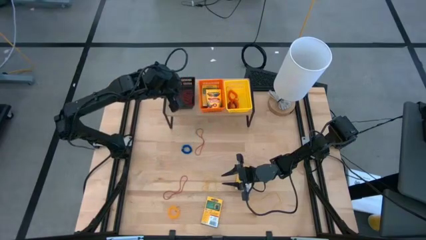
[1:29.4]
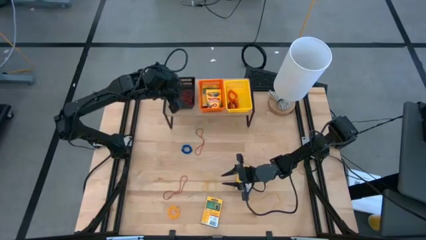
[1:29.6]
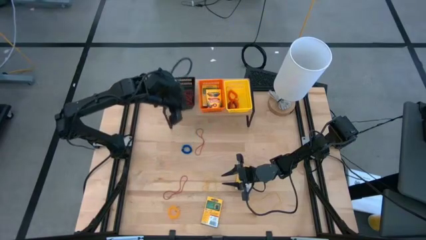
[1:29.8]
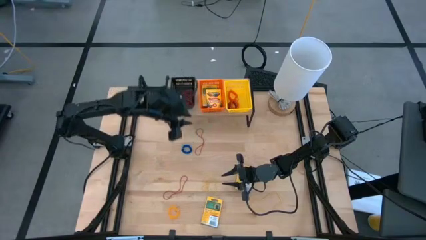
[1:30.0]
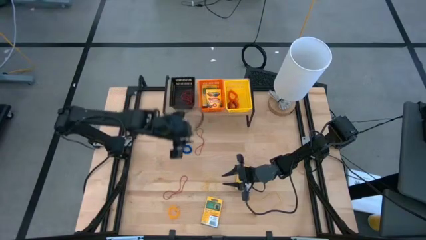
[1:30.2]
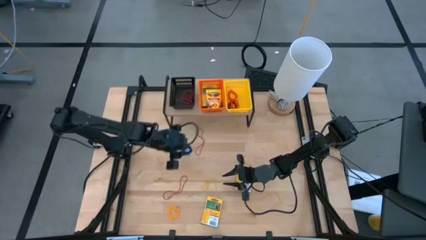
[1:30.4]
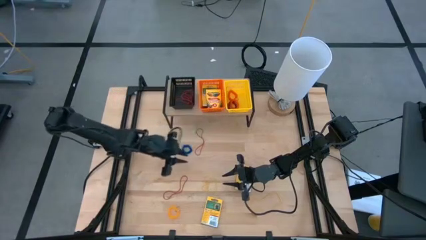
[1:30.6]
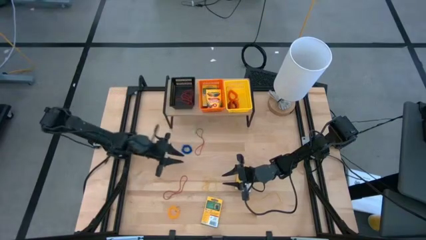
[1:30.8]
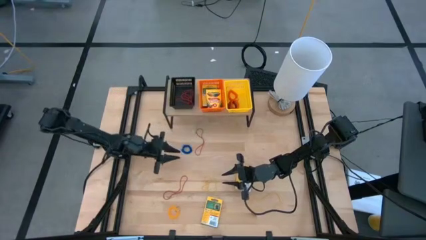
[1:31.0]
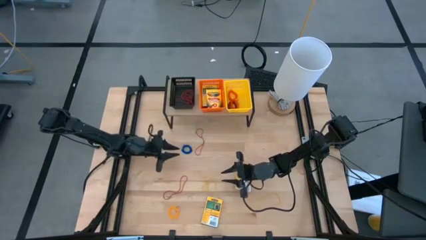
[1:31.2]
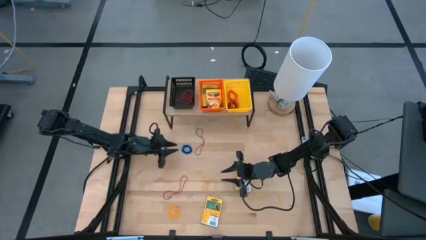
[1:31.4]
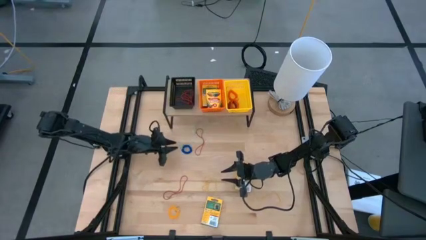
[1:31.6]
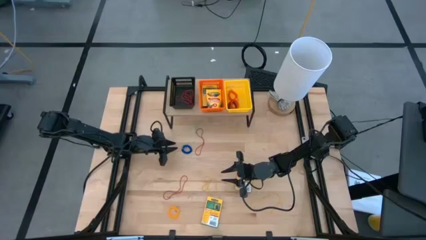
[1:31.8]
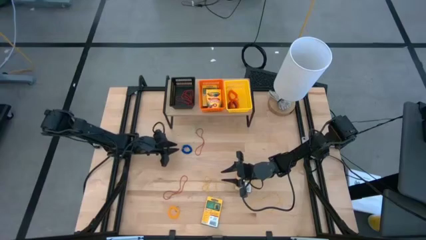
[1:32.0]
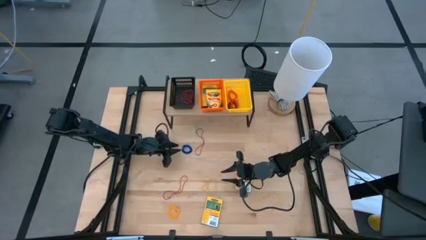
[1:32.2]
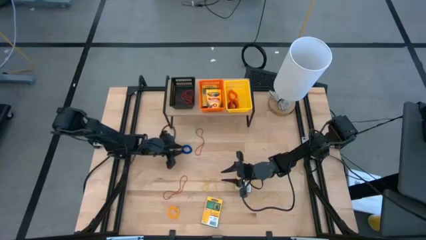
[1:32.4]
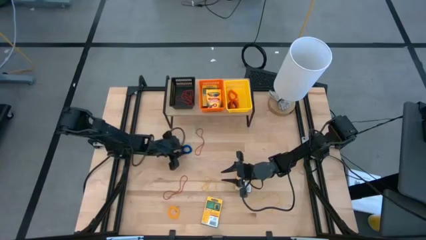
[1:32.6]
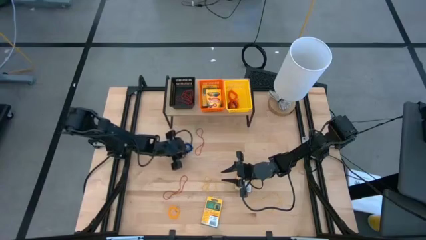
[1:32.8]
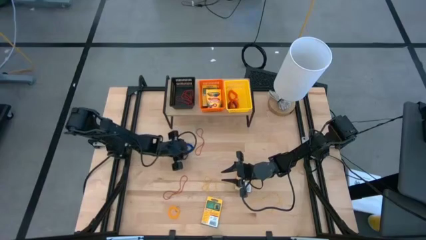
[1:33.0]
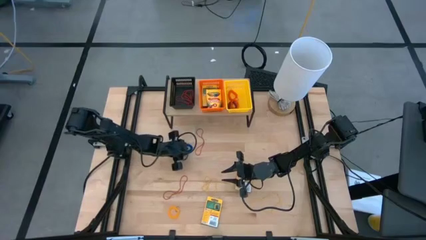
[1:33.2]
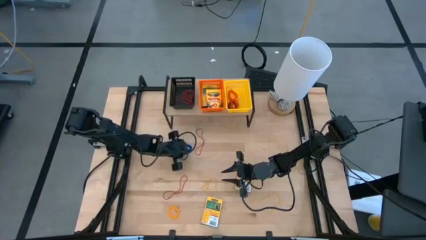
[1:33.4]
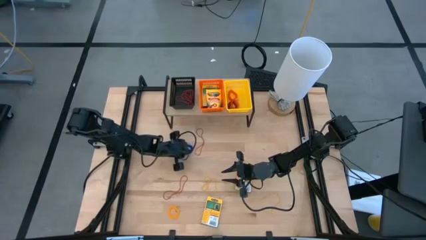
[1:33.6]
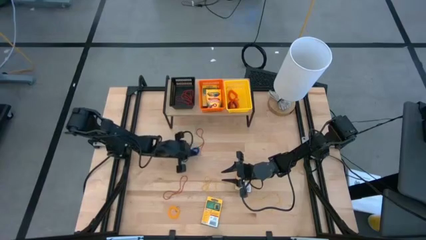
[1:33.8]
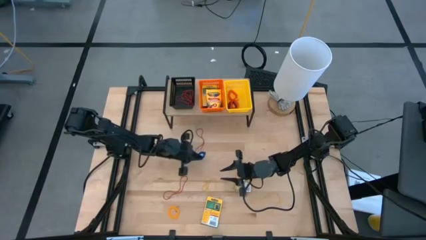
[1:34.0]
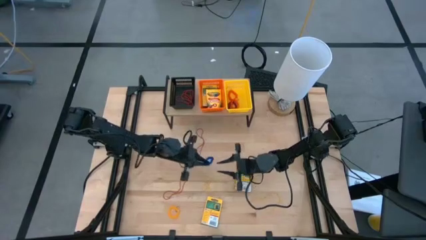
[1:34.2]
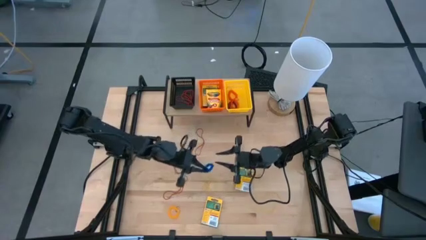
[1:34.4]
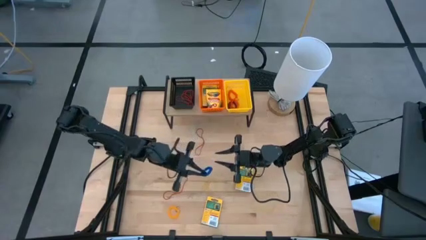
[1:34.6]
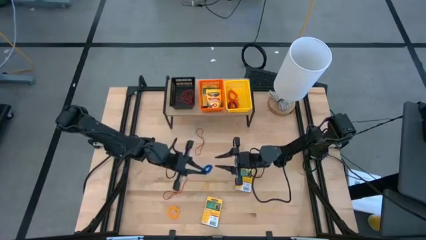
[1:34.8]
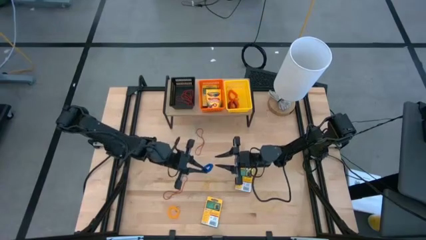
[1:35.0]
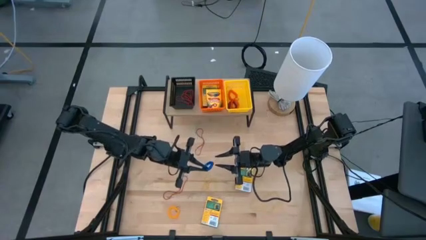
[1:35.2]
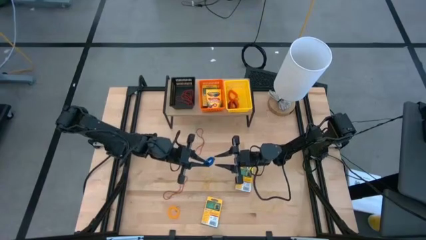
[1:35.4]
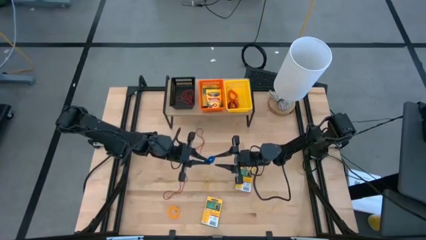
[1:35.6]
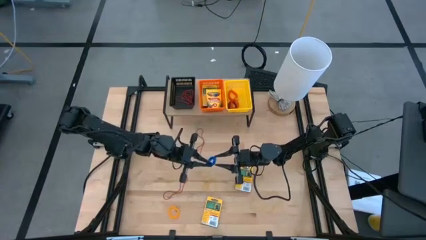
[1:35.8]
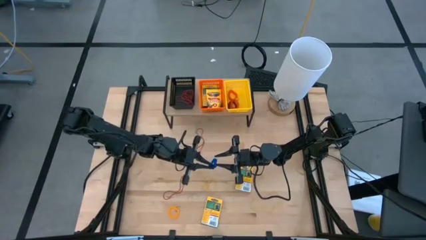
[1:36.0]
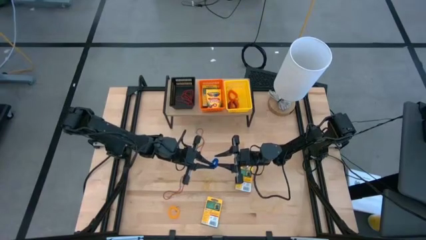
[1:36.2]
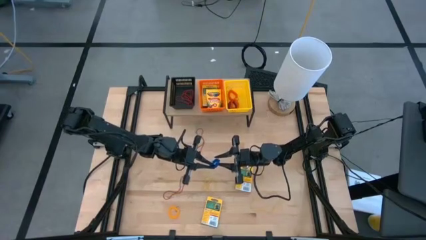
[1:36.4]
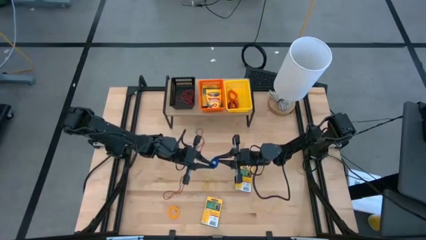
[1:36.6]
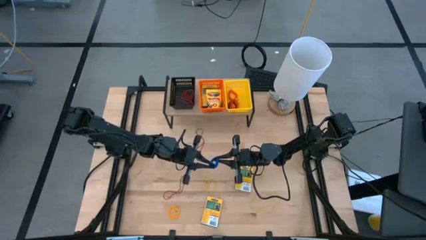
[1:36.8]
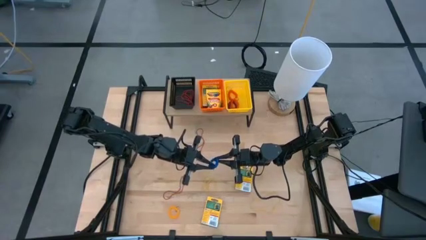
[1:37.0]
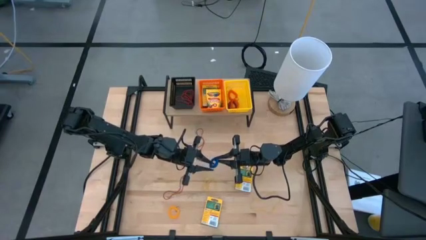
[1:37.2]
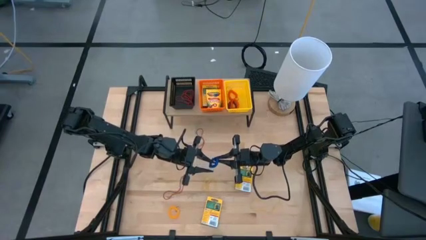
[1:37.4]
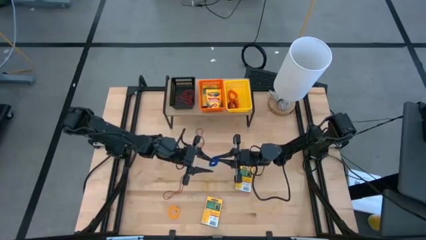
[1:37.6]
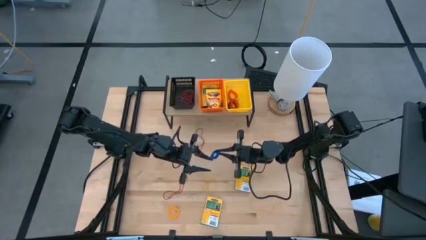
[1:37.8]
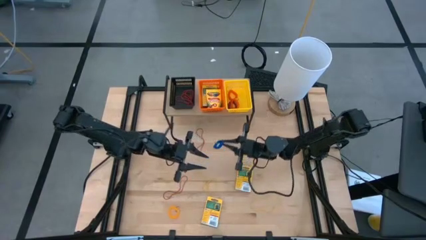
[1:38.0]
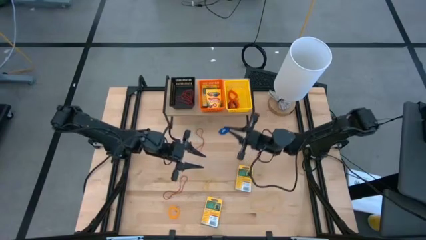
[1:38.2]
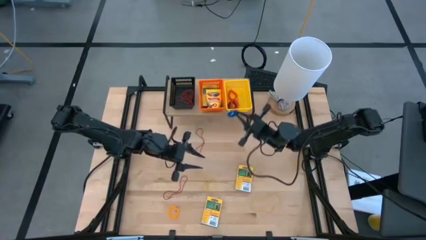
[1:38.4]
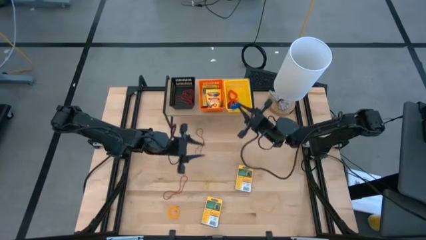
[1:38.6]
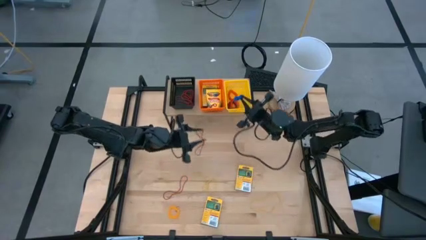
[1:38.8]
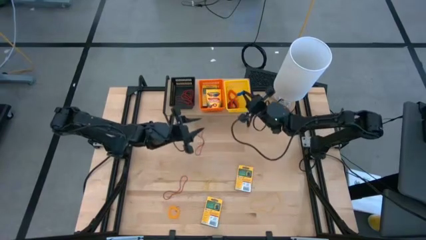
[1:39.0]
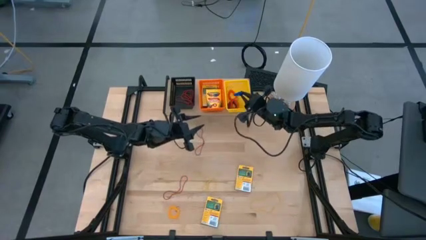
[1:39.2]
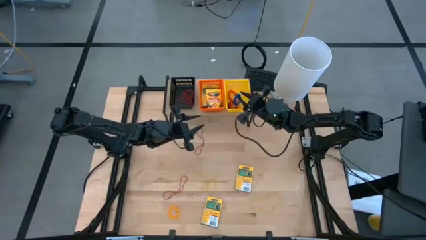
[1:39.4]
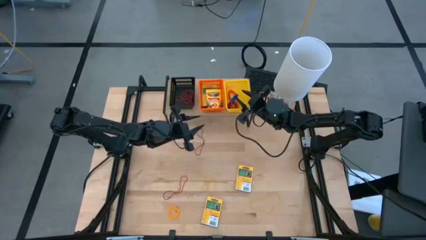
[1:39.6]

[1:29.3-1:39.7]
Task: Pick & Place Office Desk Supplies
Put the blue spring keychain into the yellow bin on the shelf

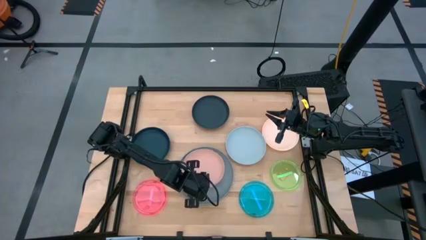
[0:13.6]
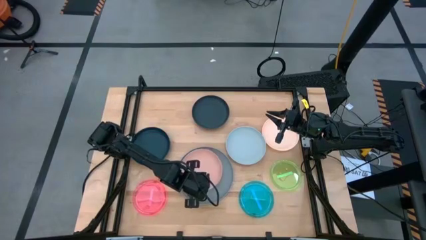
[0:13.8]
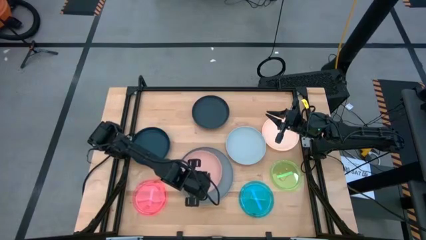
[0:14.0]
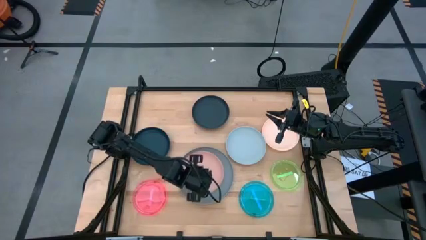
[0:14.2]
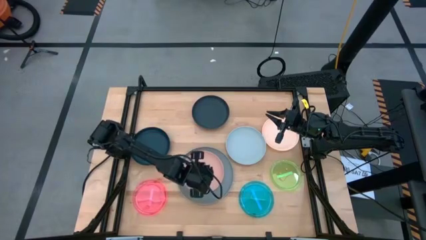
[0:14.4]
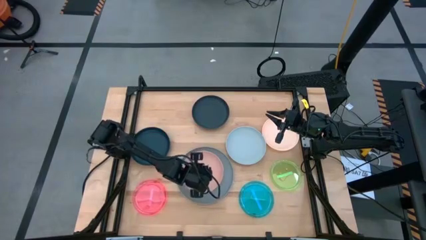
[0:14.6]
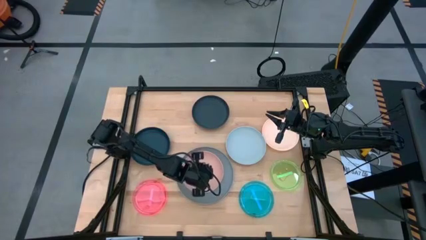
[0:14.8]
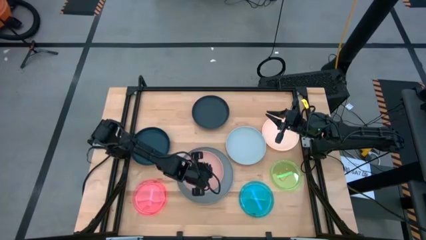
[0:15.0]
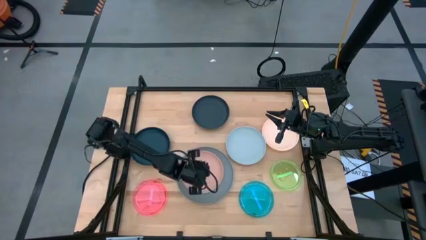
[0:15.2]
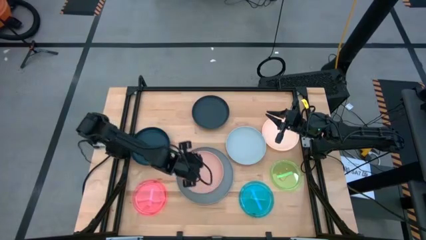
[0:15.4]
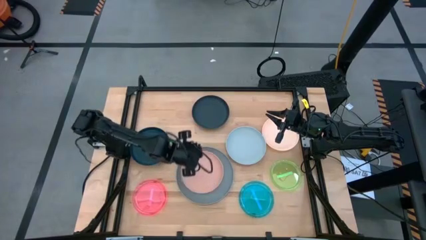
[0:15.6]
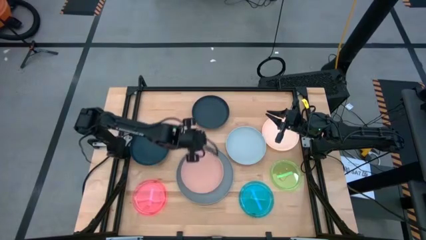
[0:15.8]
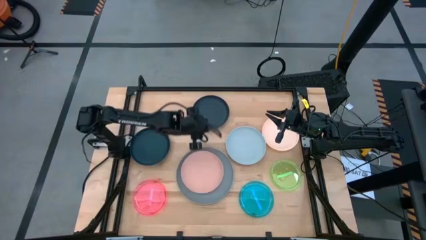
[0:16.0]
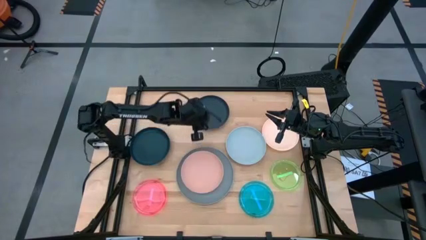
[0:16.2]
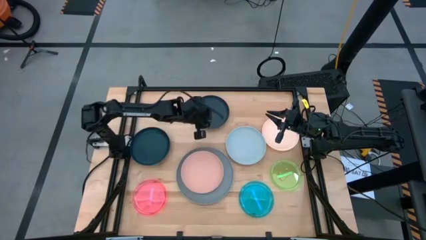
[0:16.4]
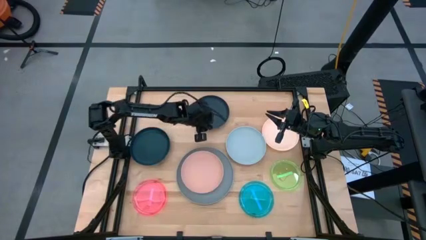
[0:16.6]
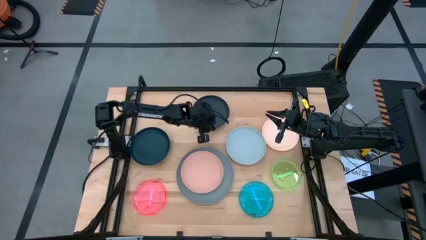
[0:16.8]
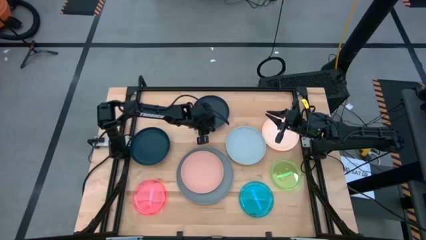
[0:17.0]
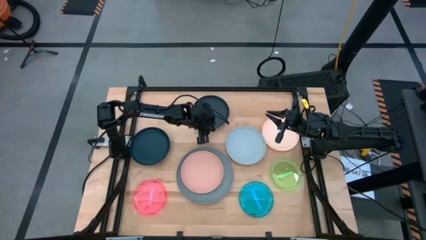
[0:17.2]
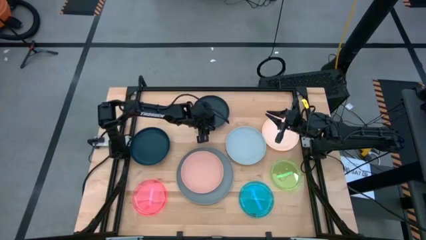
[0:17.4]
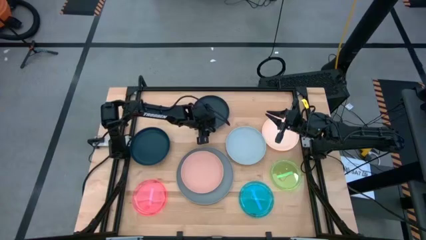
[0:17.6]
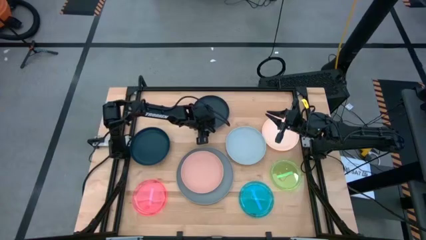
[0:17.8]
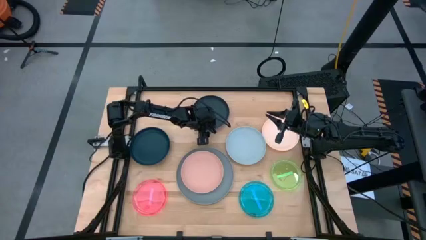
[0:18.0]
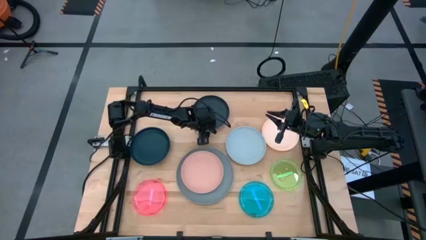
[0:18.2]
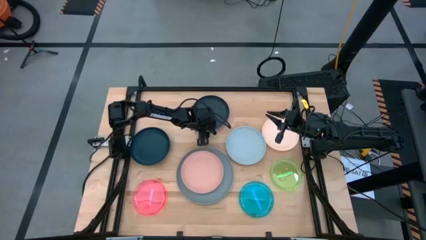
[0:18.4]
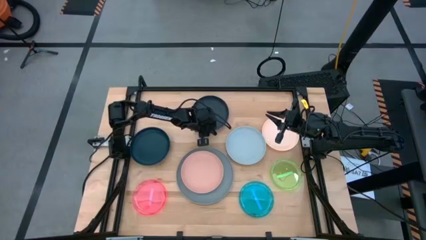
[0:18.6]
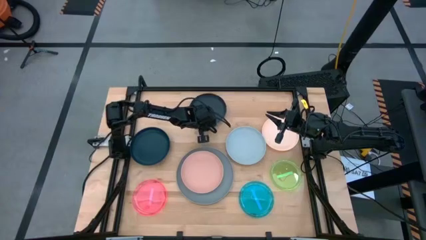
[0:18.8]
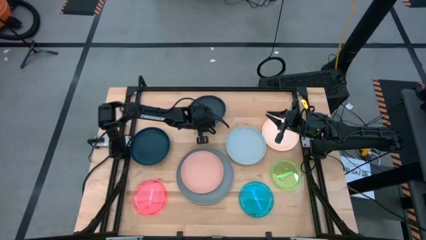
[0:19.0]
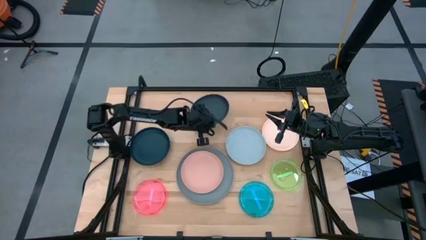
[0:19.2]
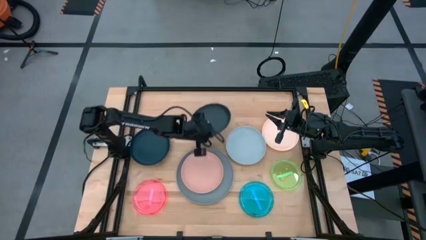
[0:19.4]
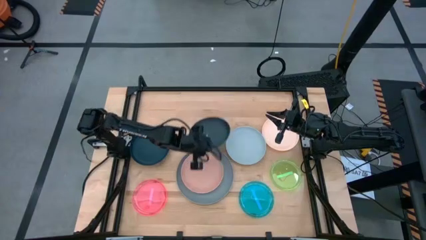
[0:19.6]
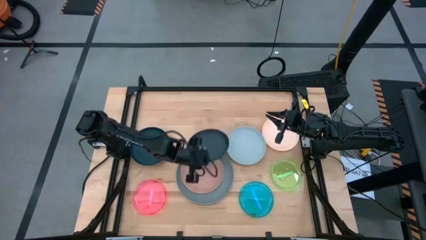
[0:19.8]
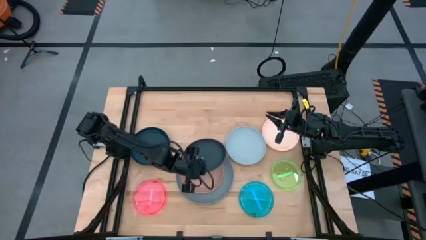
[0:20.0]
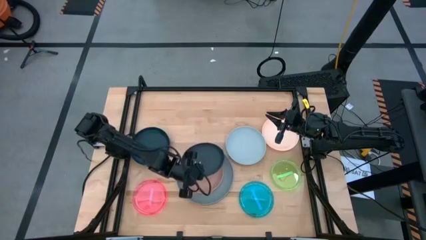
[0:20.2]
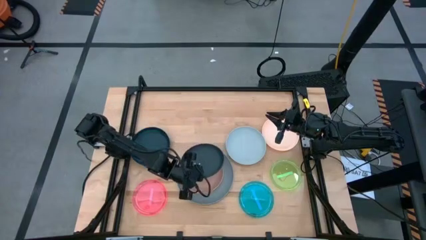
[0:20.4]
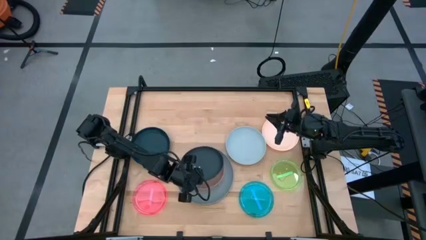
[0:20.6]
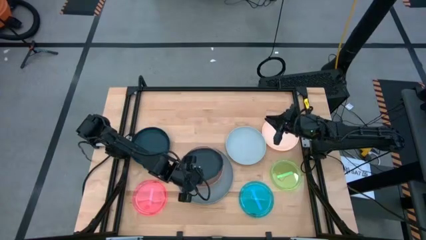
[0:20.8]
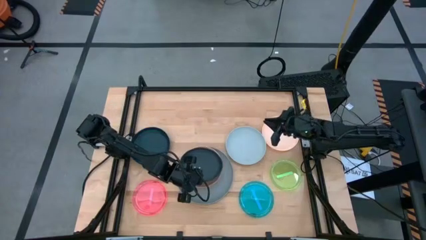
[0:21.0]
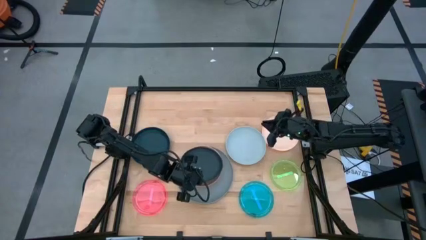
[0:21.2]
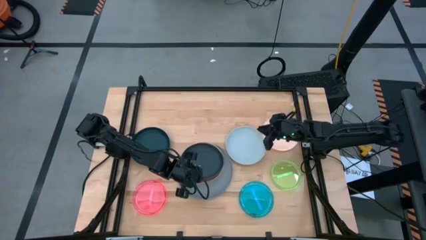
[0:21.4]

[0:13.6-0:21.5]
Task: Stack plastic plates
Stack the black plate on top of the light pink plate
